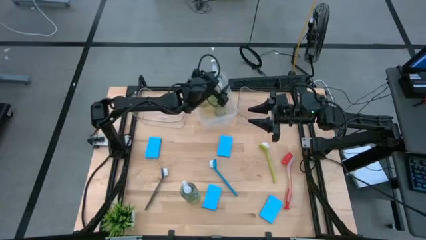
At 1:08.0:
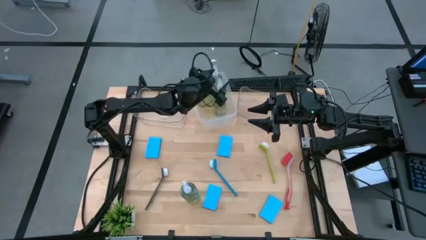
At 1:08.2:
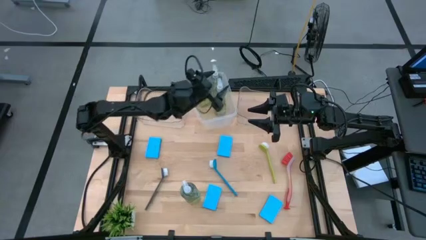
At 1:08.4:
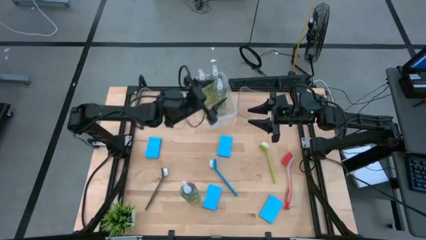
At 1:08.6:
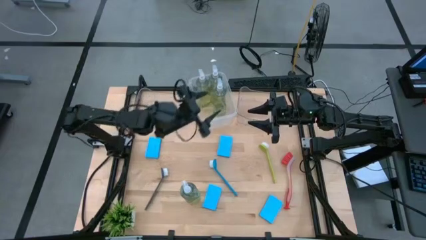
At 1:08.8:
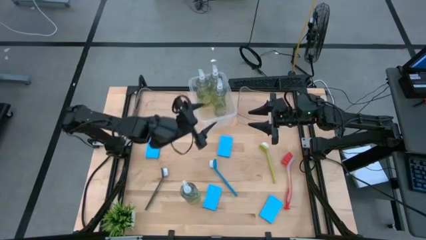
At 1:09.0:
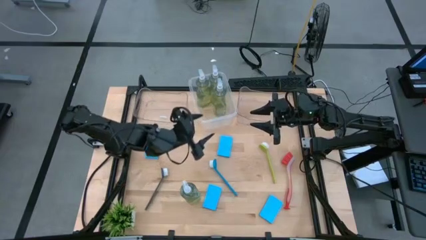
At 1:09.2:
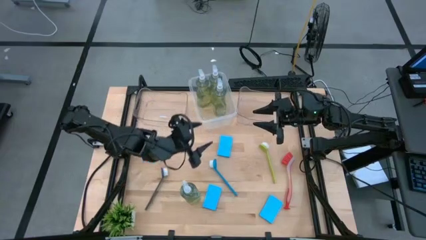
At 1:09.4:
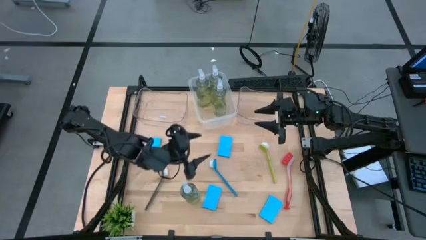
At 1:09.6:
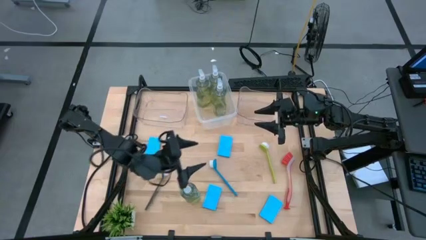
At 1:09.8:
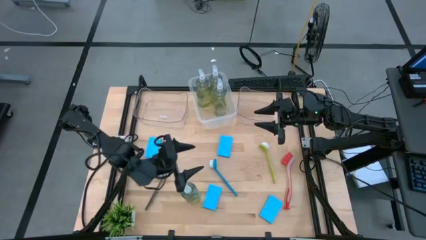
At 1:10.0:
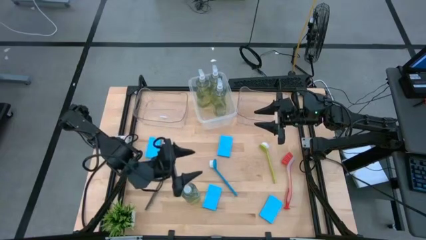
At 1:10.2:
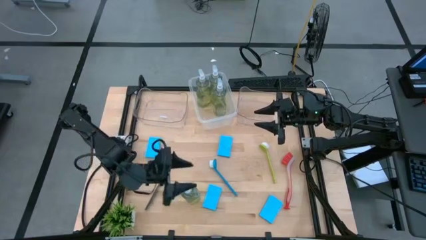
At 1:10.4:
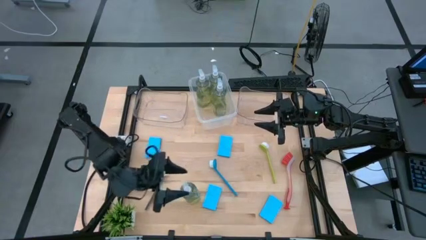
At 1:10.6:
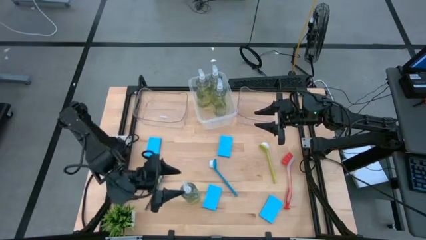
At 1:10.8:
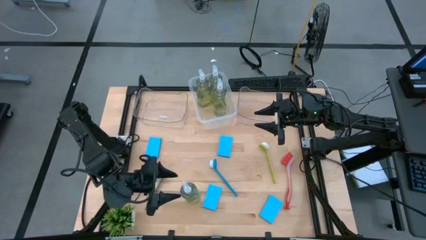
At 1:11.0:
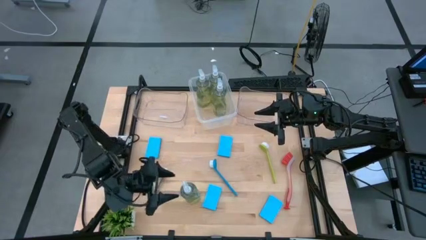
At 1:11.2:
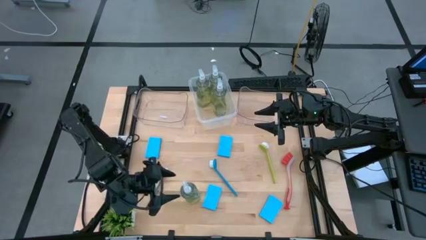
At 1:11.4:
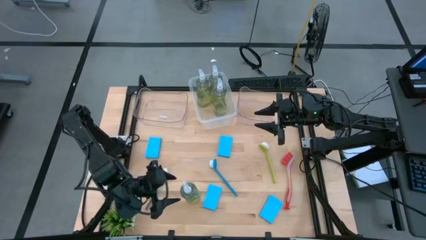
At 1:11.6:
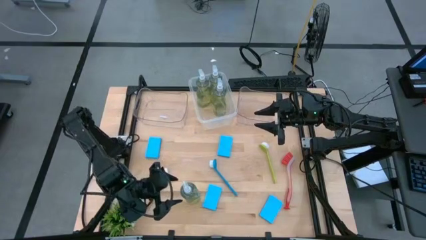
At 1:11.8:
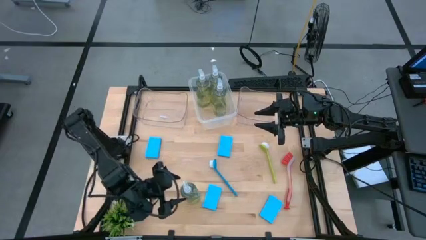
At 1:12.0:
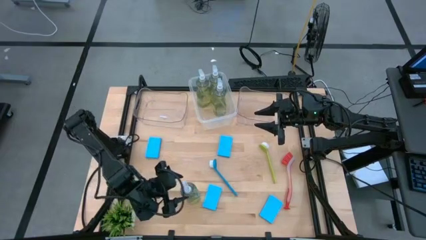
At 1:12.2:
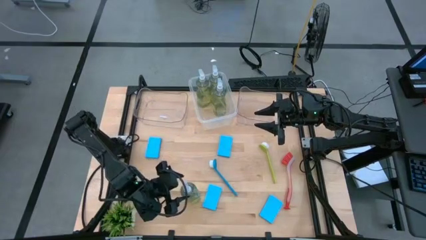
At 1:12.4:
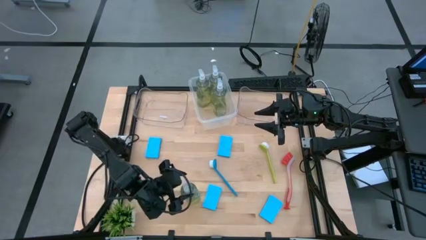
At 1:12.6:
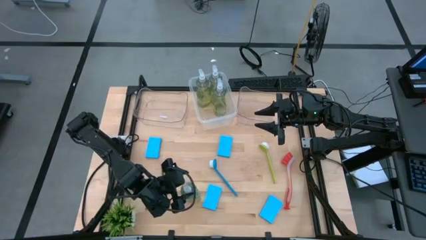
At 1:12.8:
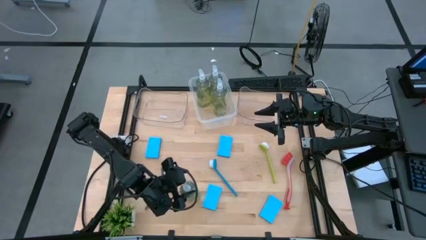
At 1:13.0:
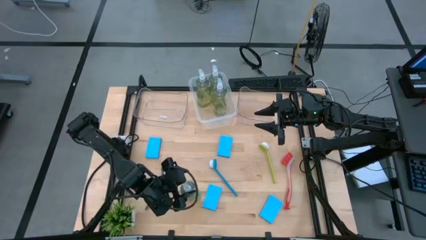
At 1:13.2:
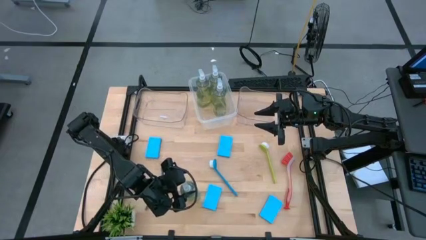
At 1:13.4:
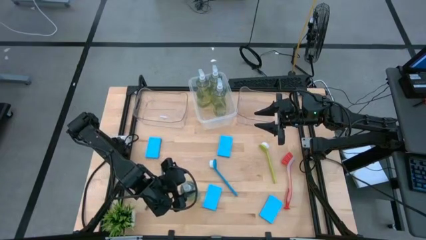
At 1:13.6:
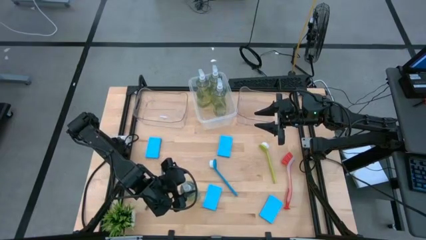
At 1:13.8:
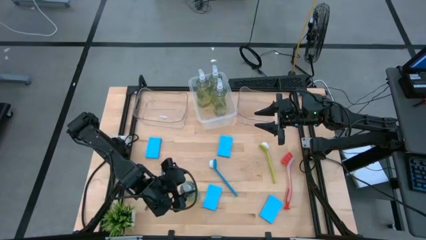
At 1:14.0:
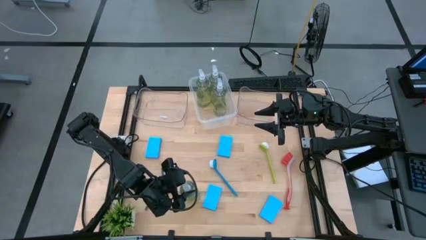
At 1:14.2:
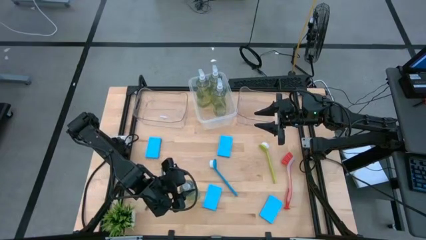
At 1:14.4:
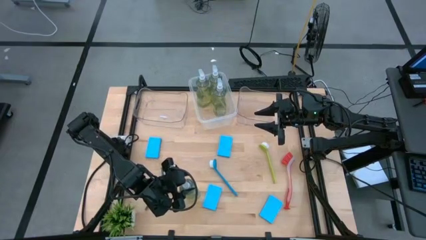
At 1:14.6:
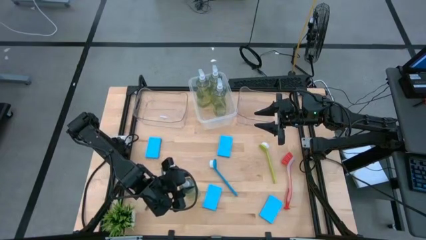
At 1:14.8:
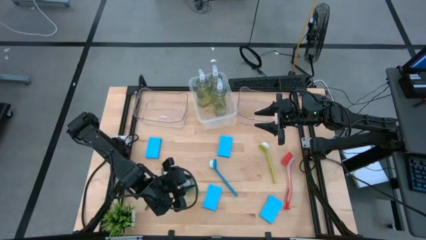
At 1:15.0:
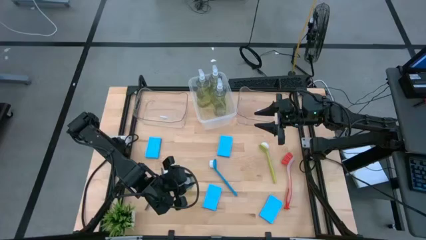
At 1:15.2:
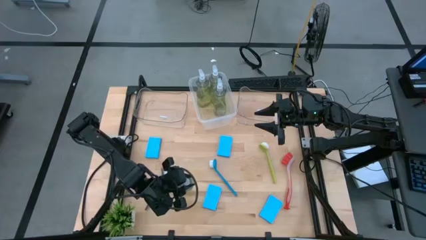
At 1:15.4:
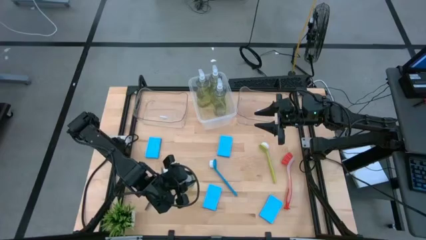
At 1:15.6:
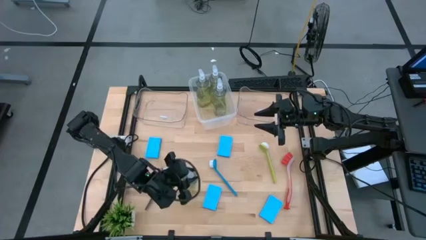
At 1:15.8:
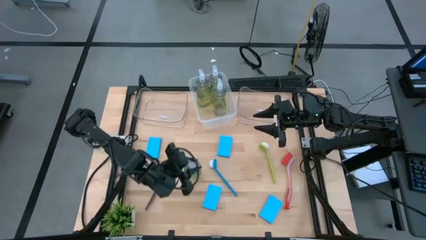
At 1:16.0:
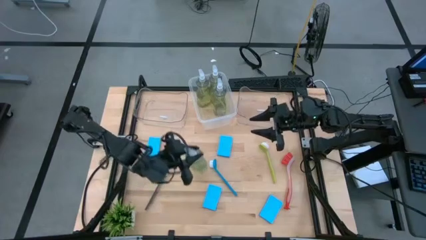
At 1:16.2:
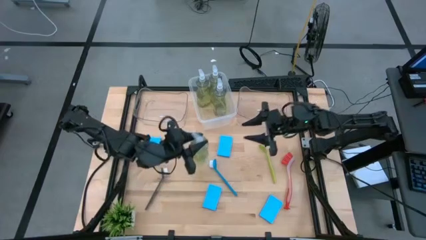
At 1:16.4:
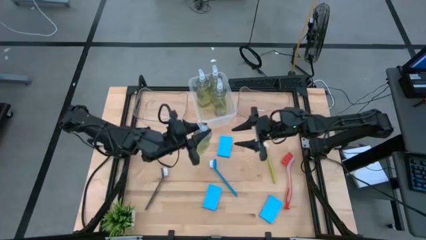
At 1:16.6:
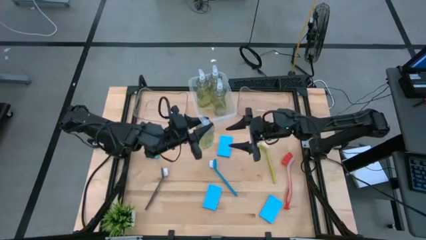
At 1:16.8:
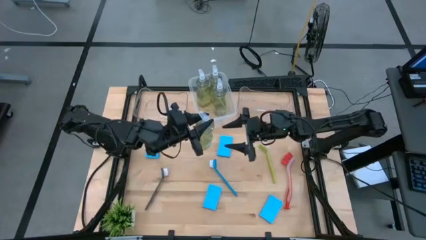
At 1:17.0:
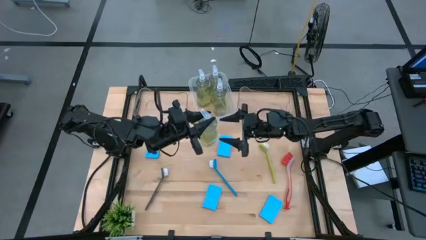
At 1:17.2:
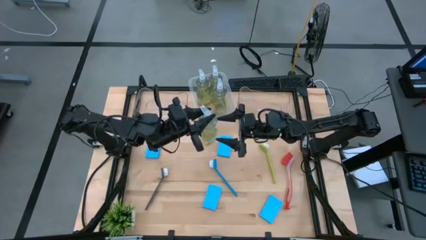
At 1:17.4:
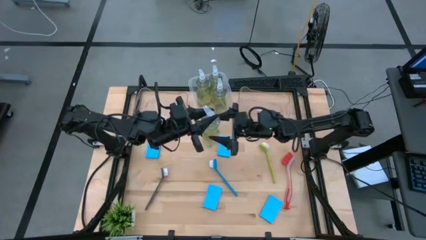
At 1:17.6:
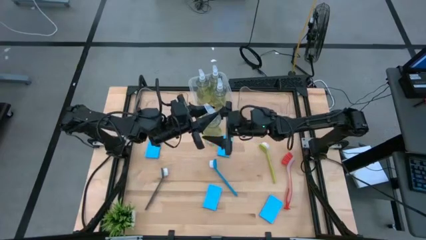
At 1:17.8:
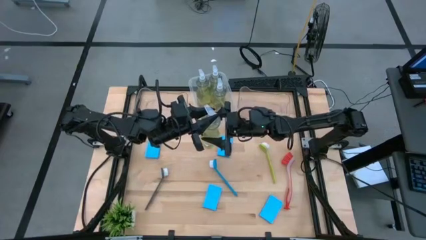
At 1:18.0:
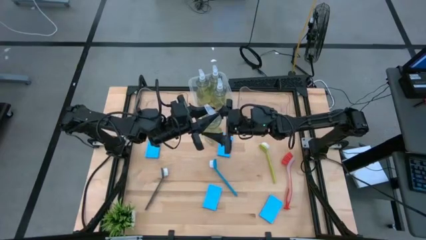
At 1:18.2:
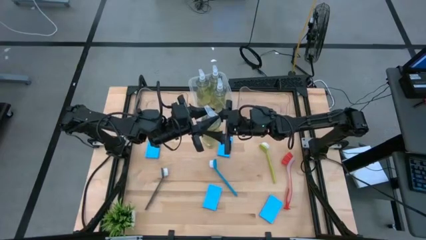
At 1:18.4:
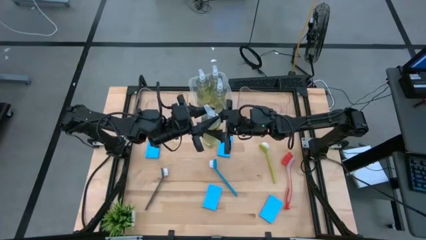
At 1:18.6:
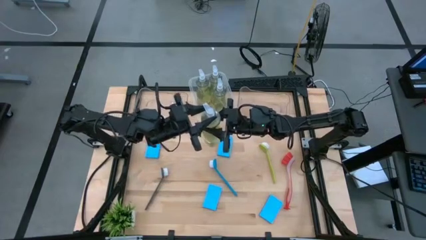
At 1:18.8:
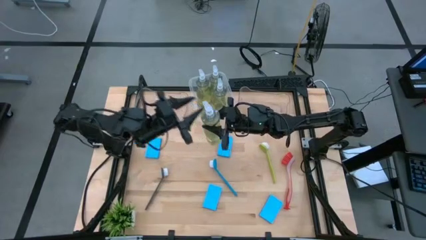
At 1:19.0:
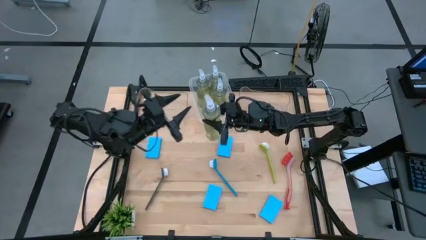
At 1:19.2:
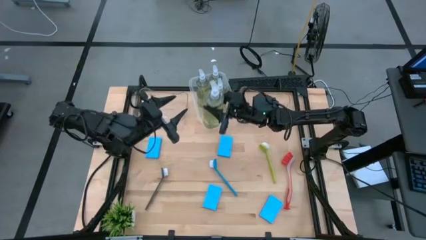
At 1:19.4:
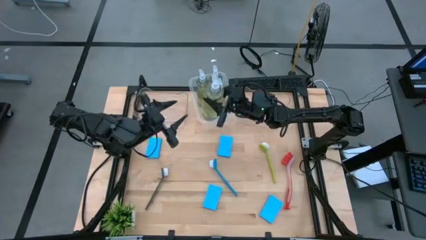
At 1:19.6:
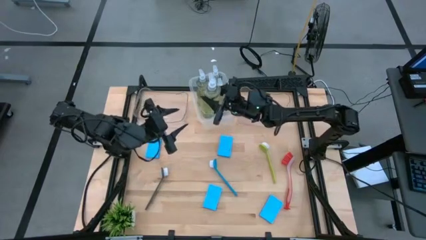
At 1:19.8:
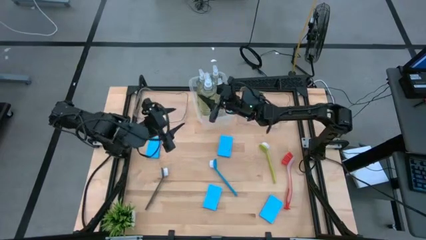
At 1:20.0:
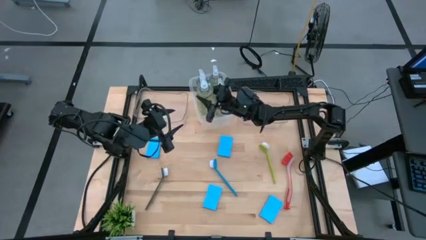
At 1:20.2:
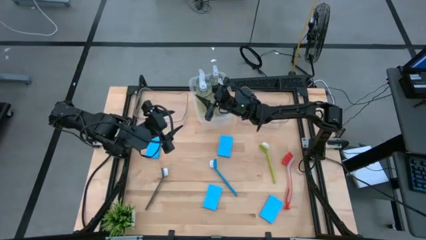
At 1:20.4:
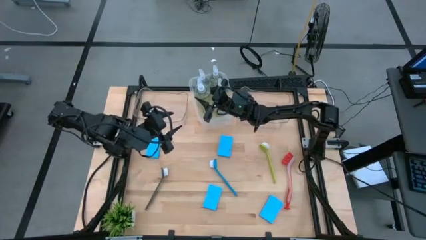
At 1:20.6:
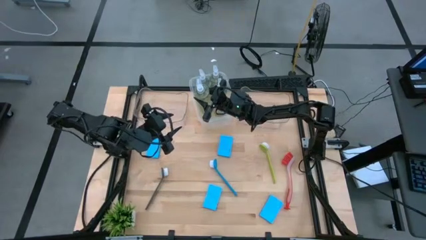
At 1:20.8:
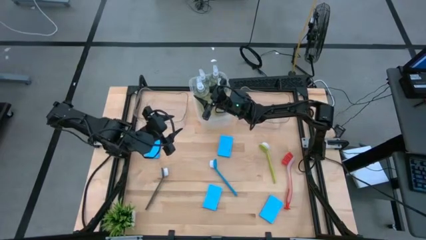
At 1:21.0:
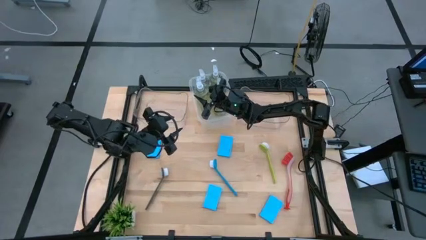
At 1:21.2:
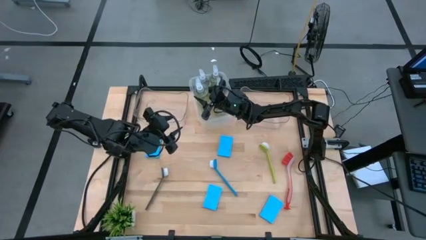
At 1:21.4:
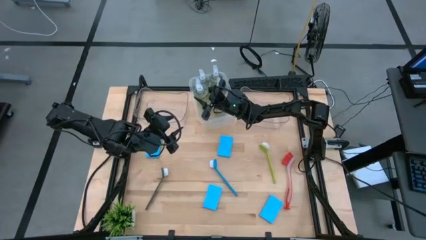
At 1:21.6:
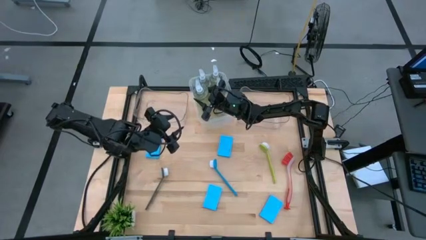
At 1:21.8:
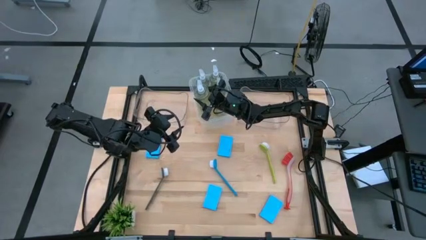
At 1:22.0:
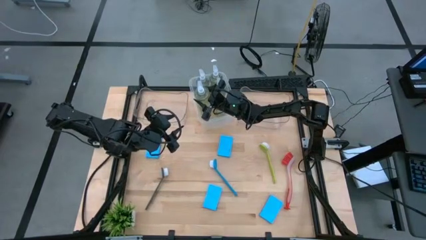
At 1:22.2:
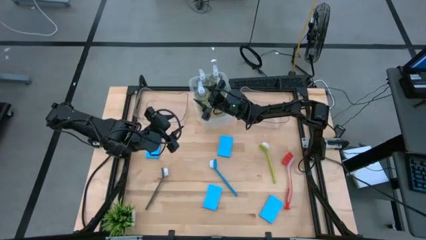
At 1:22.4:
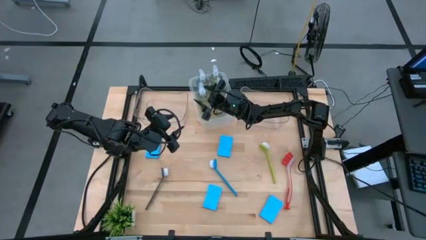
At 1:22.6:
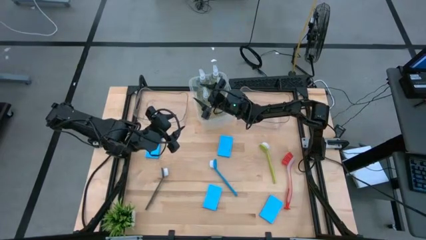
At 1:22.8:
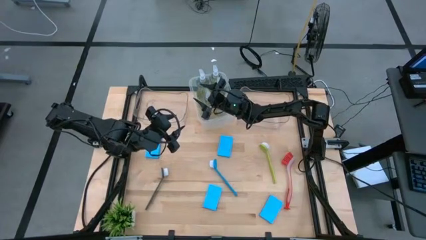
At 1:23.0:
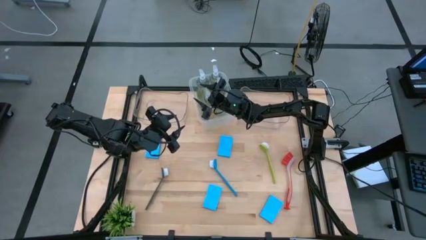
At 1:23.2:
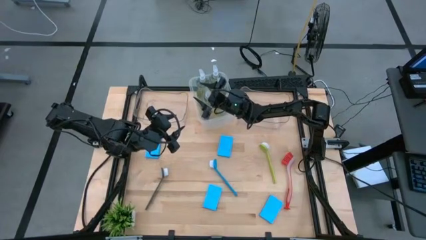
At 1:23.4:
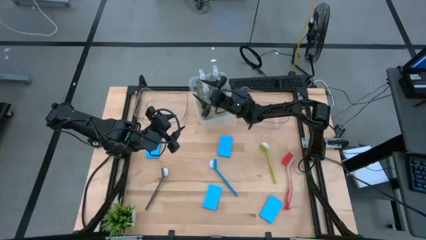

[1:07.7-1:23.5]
Task: Pick & Place Kitchen Sink Supplies
Put the dish soap into the white bin
